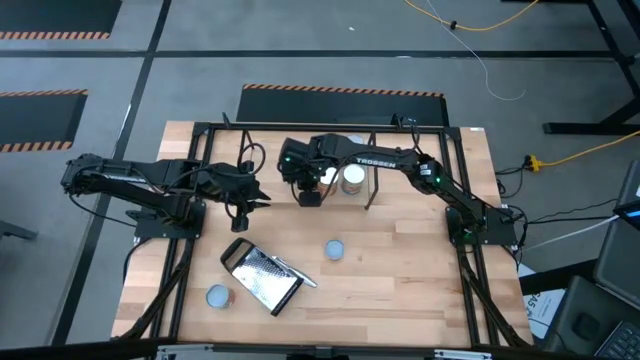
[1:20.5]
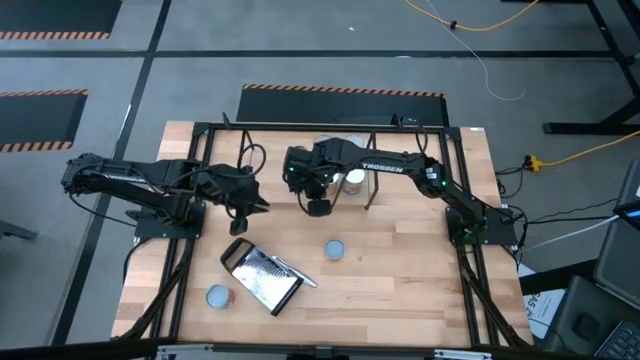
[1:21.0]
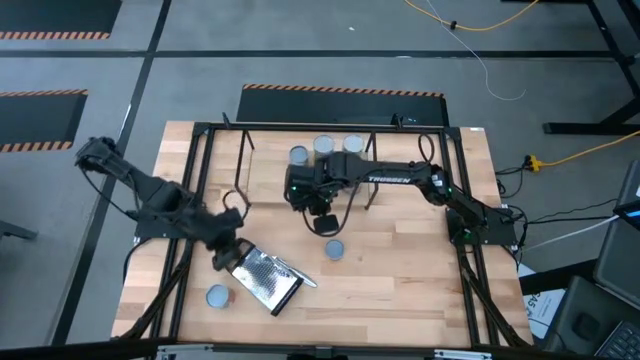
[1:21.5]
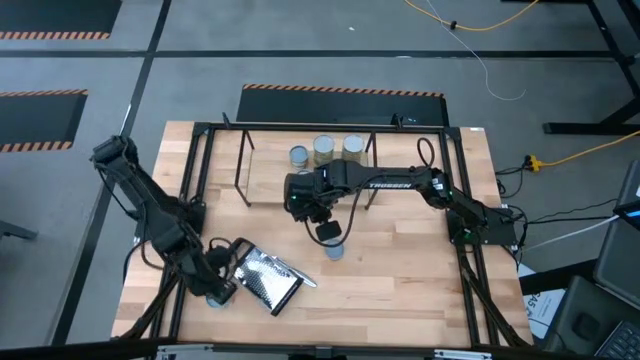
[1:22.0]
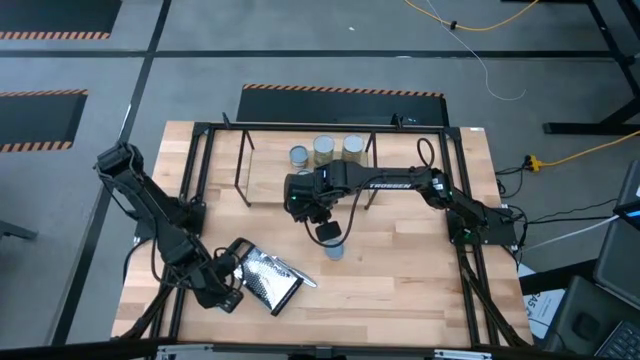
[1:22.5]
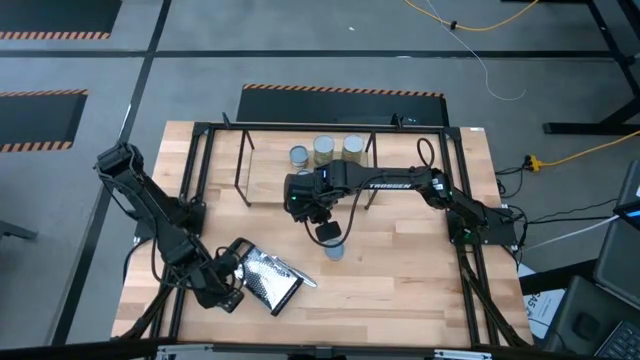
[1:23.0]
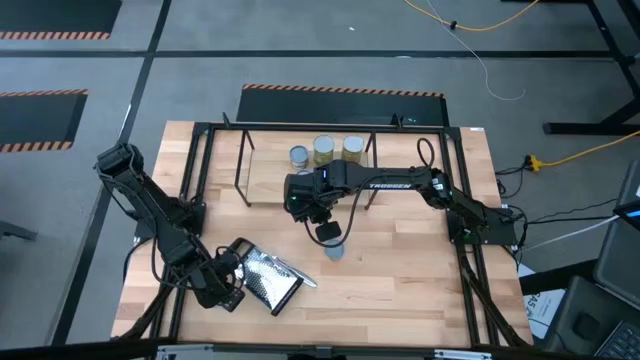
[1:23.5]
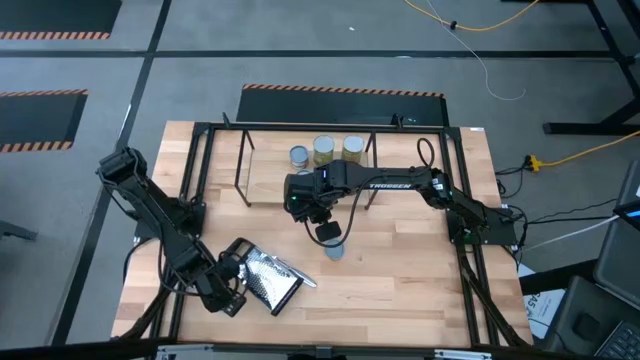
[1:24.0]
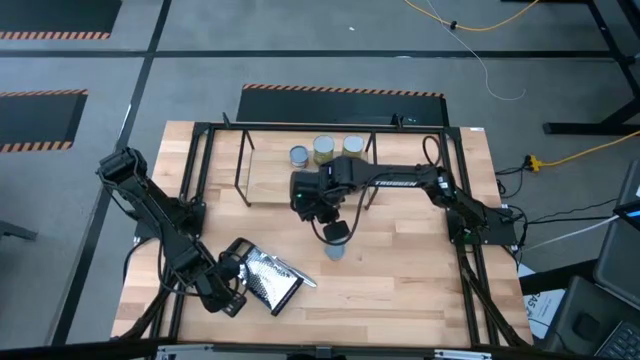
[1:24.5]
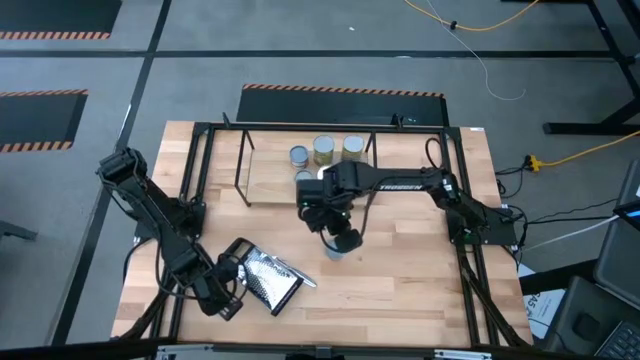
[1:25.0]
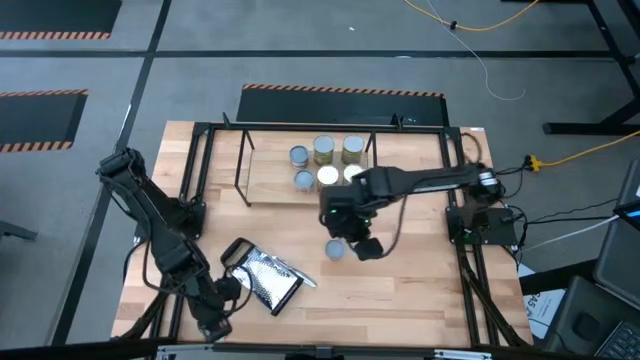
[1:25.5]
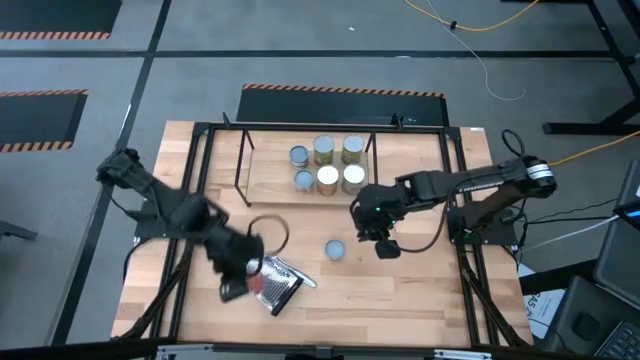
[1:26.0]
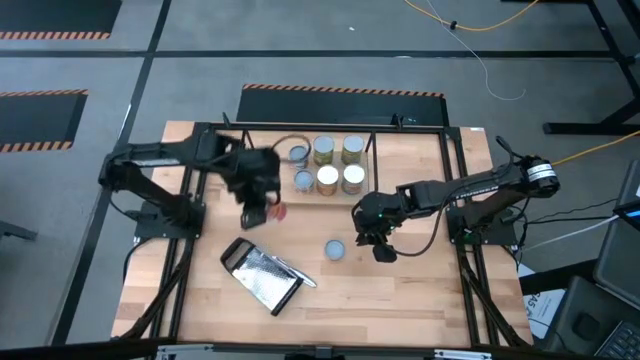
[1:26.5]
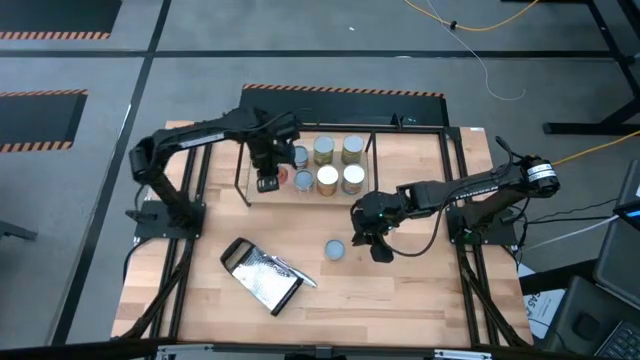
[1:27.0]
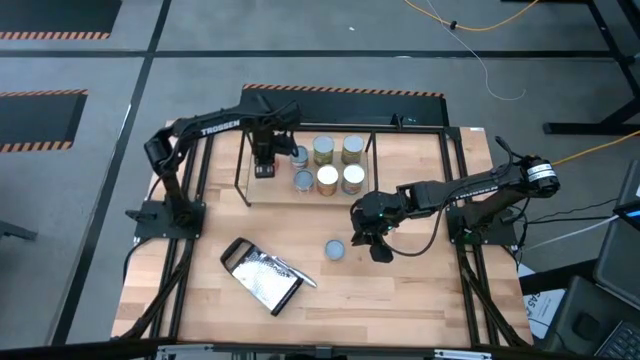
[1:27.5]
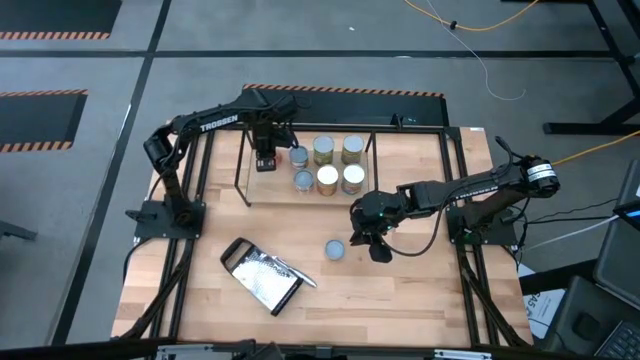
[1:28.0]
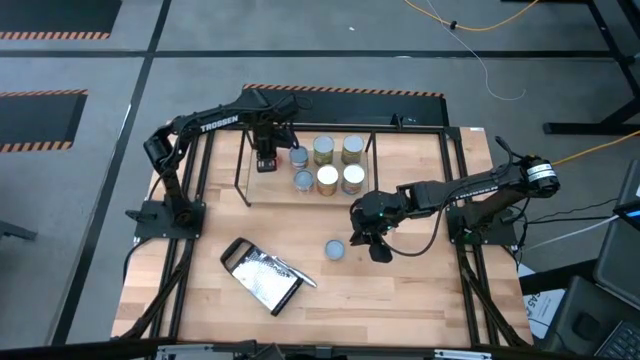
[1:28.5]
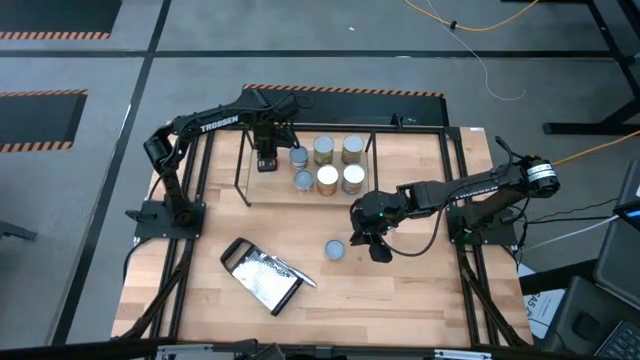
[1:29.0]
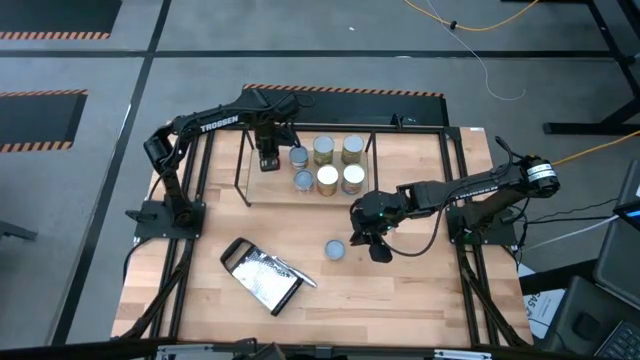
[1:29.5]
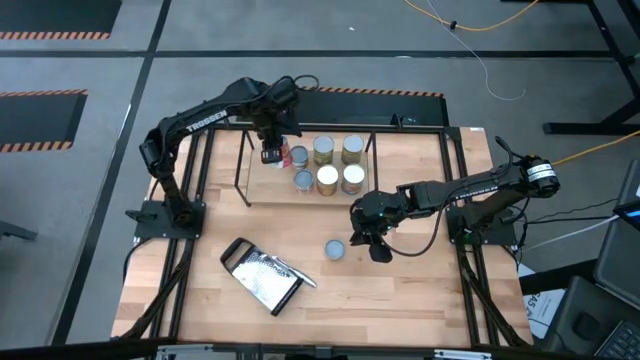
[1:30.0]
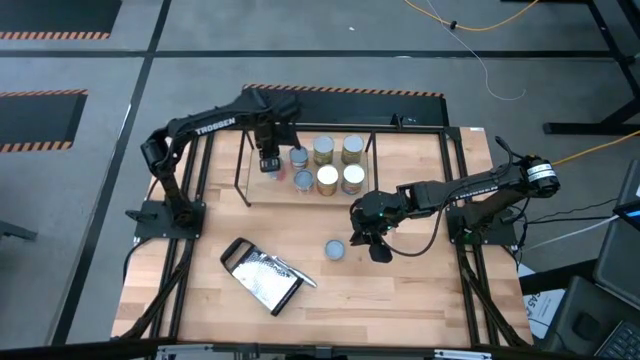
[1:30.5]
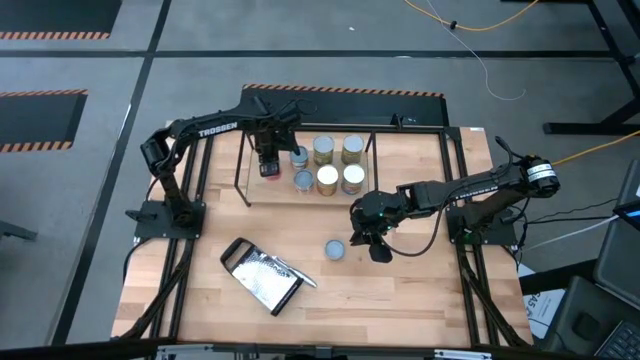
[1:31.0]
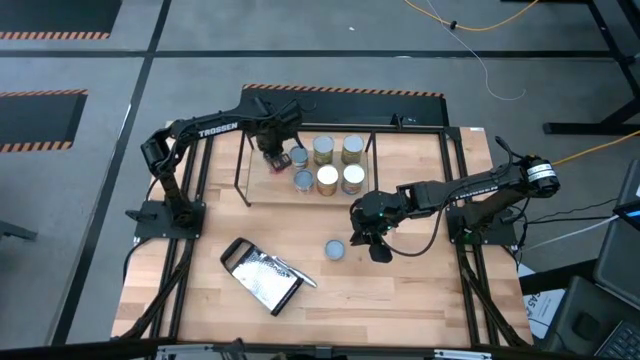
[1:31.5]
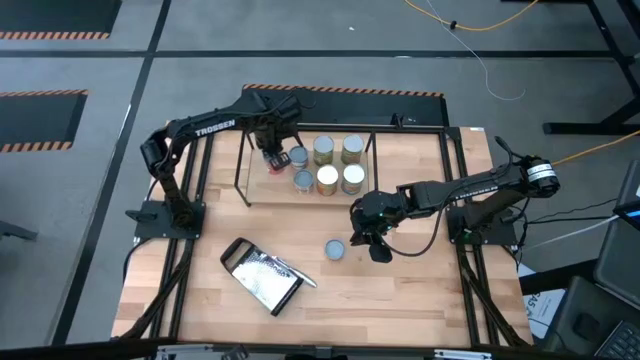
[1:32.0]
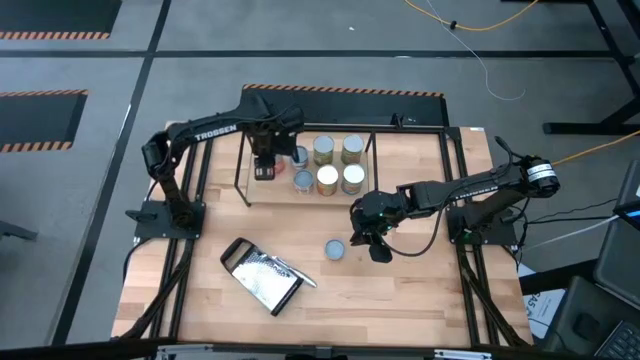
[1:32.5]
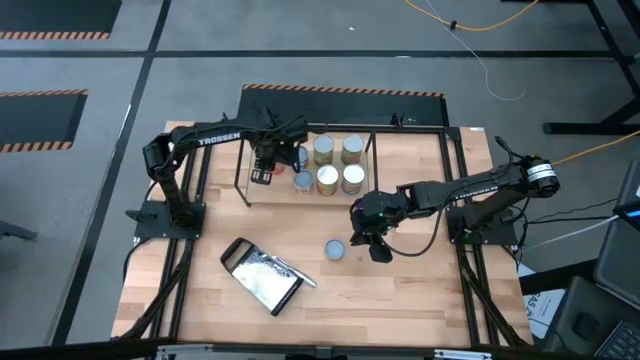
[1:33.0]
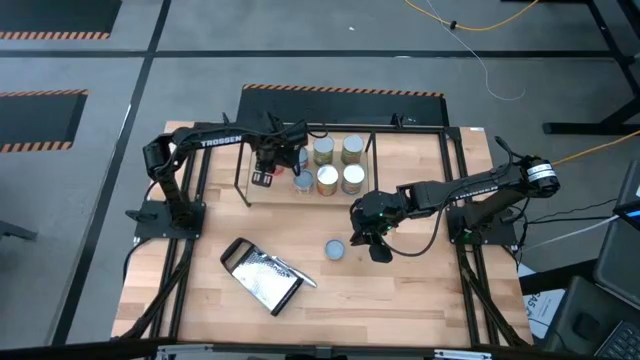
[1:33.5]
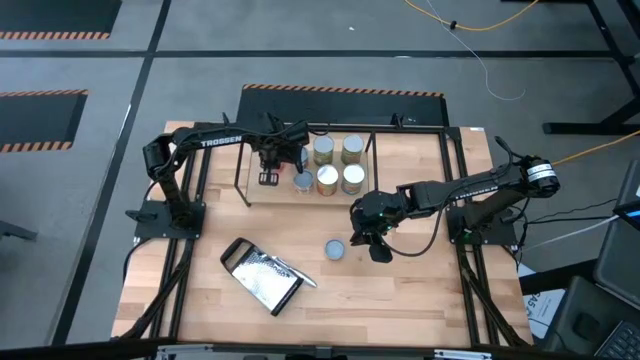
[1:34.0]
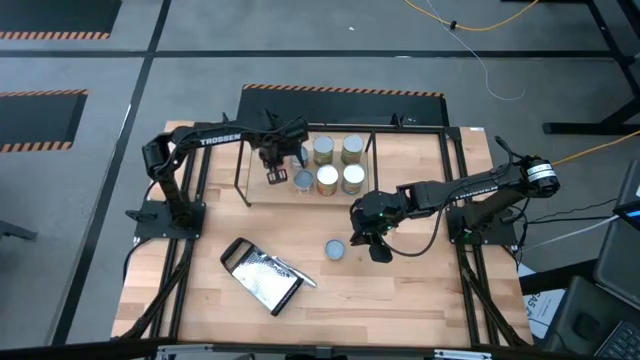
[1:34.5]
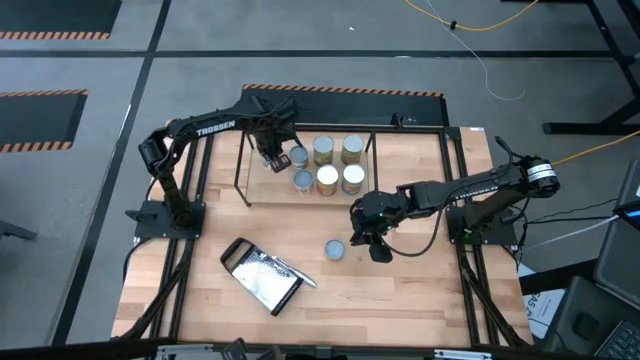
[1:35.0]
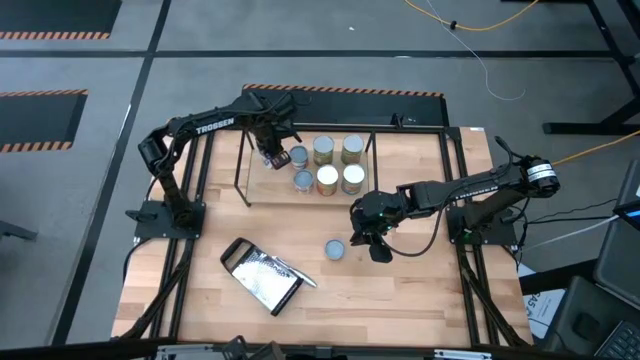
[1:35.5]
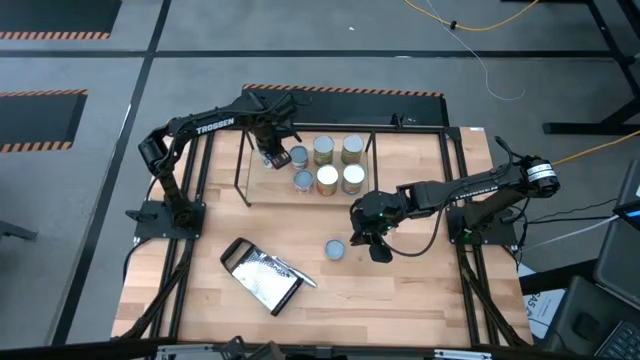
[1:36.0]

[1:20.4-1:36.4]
Task: Pick and place cans onto a shelf
Put the canned mixed fruits on the shelf

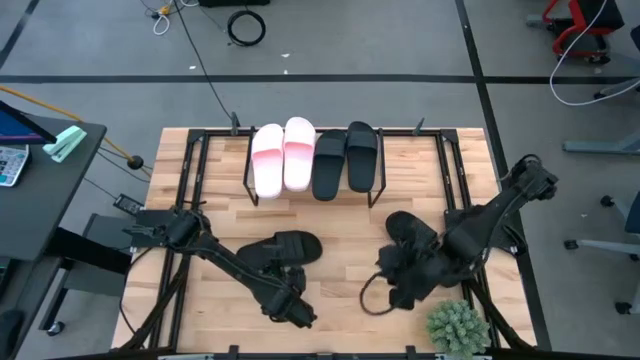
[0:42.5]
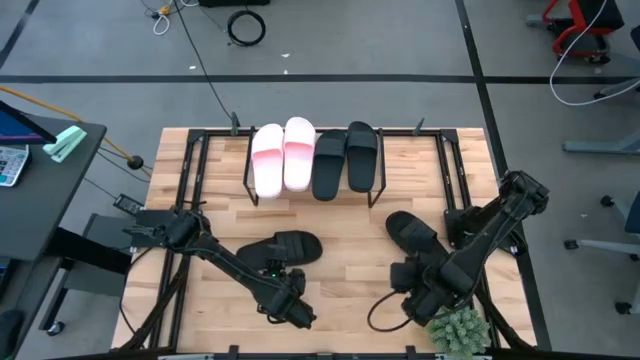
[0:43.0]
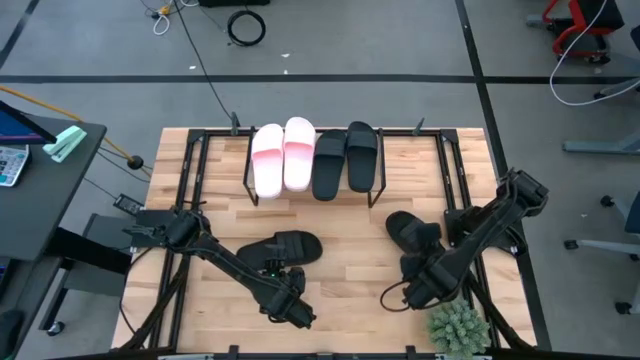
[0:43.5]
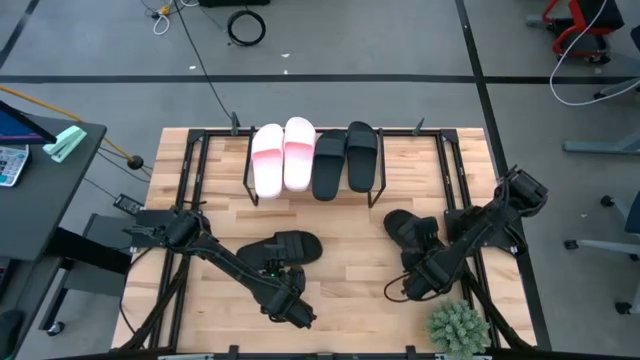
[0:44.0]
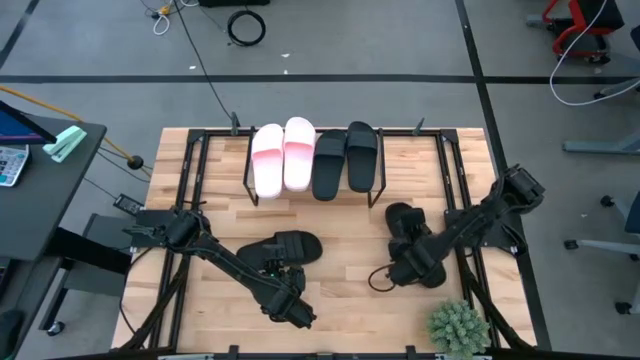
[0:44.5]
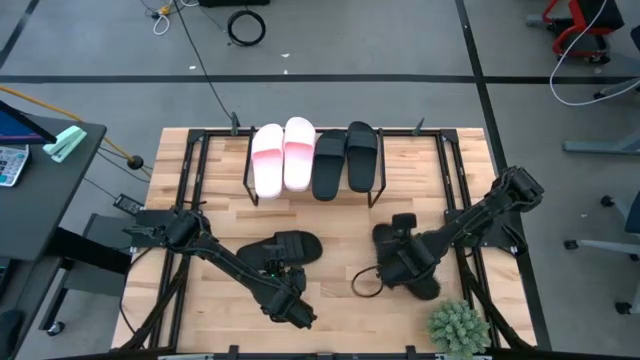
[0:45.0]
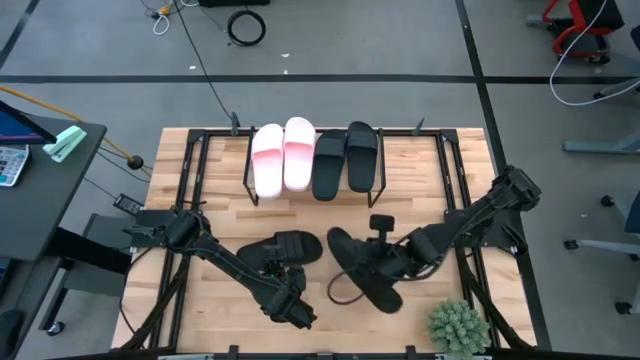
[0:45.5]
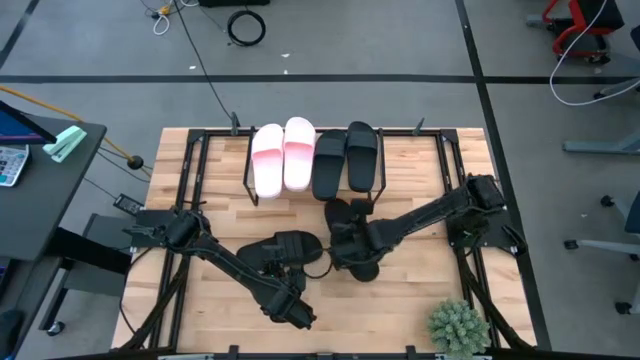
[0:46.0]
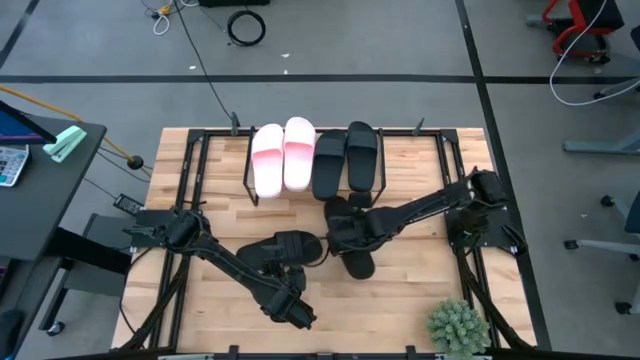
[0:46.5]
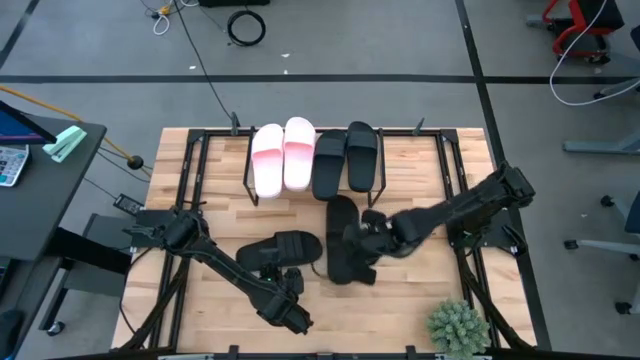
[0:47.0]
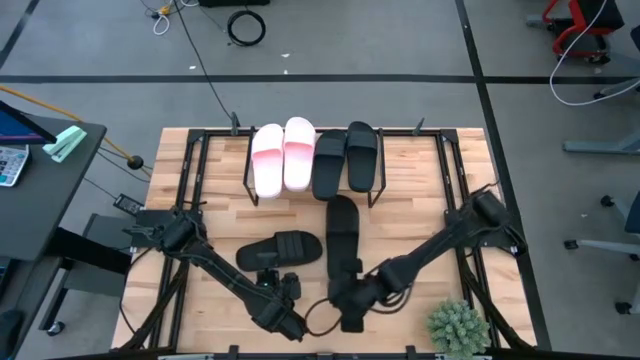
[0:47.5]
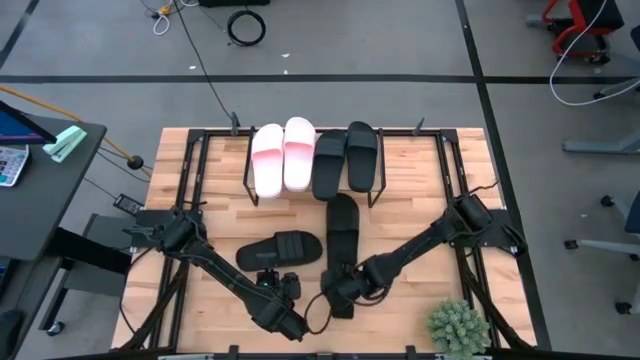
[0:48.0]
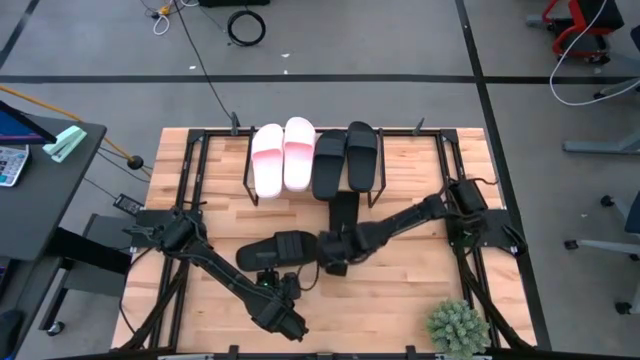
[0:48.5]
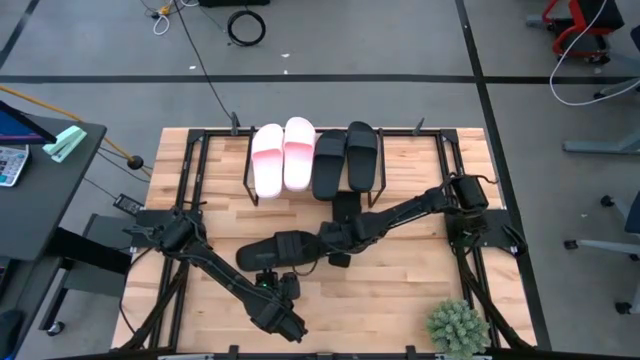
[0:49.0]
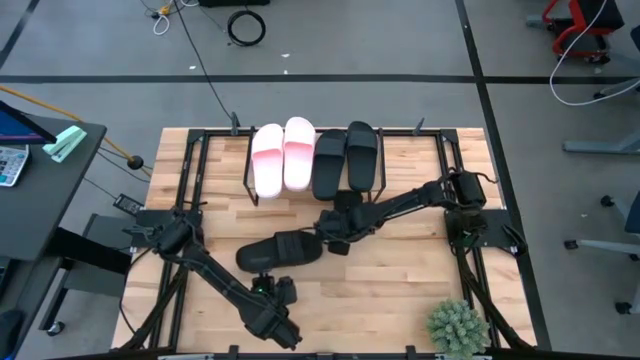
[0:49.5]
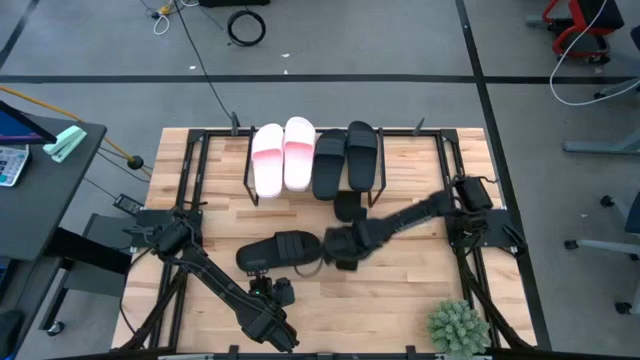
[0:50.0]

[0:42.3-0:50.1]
Task: Pick and place slides into the shelf
Move the right black slipper under the shelf
